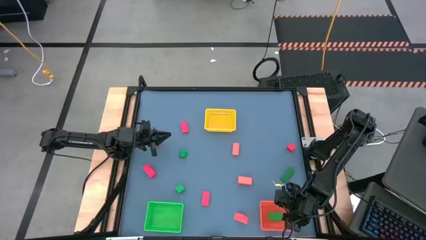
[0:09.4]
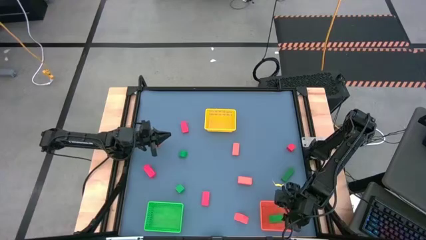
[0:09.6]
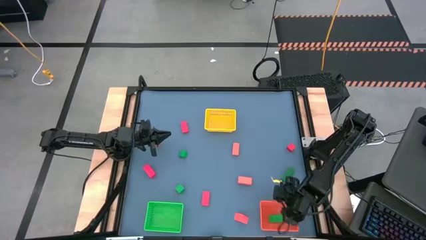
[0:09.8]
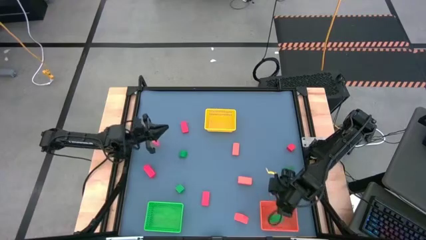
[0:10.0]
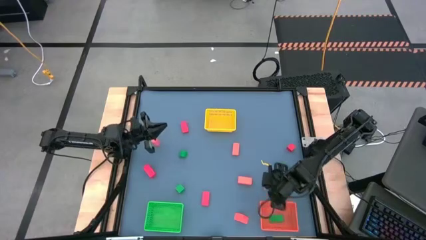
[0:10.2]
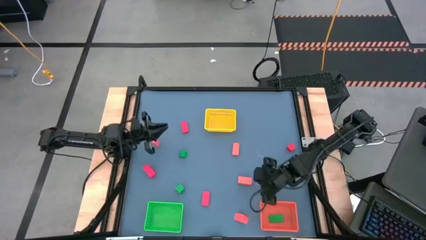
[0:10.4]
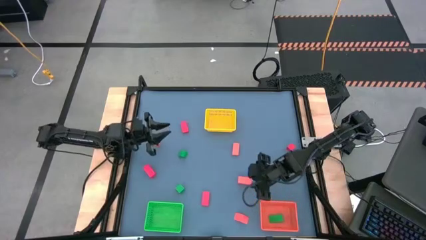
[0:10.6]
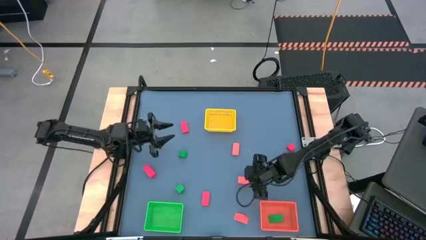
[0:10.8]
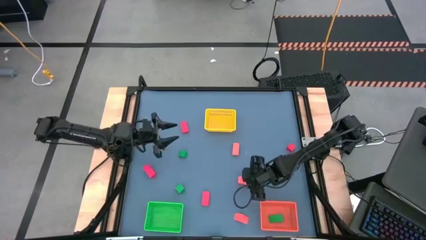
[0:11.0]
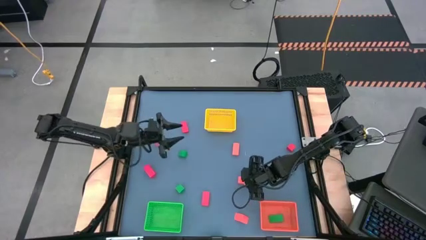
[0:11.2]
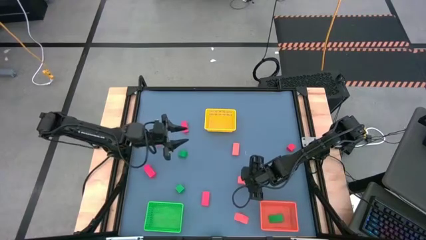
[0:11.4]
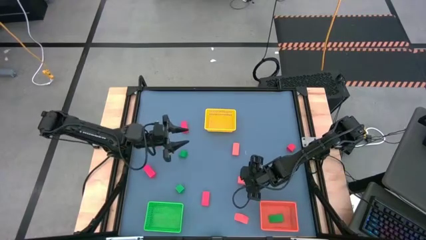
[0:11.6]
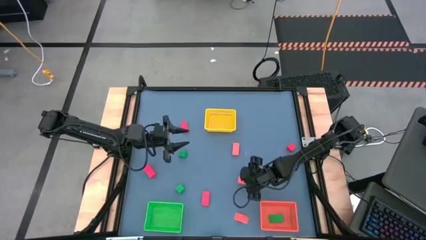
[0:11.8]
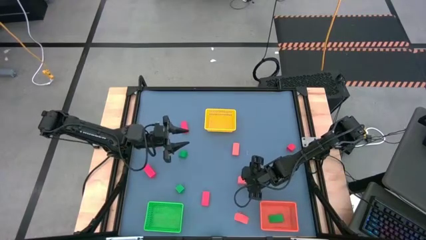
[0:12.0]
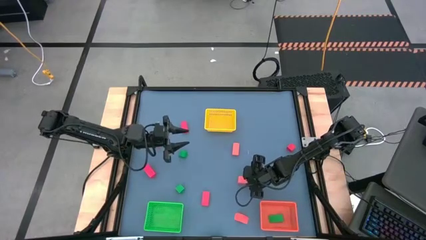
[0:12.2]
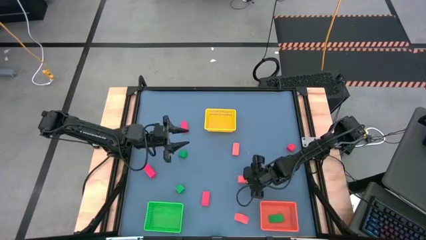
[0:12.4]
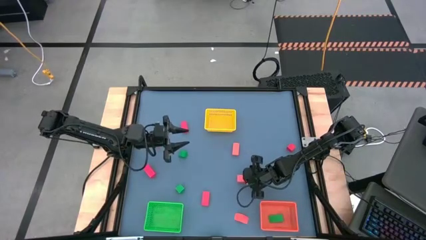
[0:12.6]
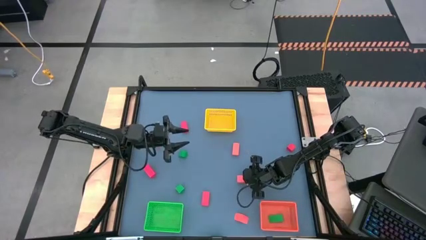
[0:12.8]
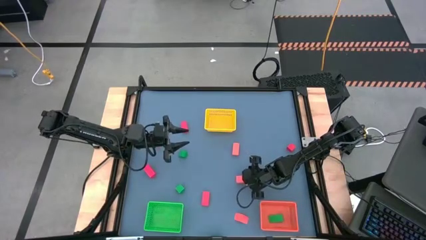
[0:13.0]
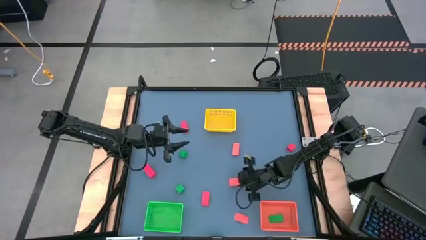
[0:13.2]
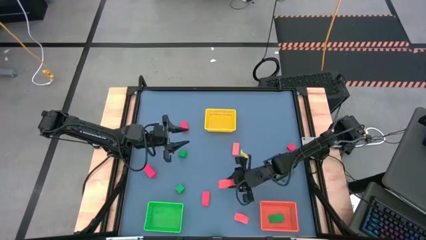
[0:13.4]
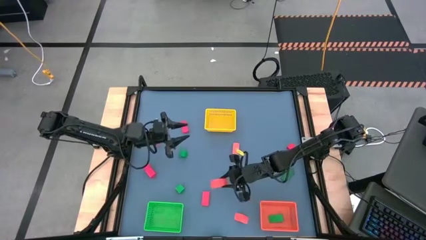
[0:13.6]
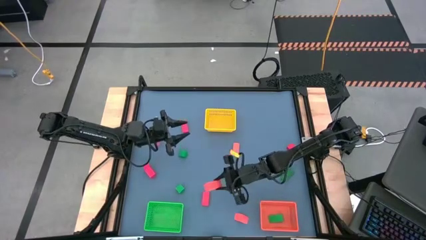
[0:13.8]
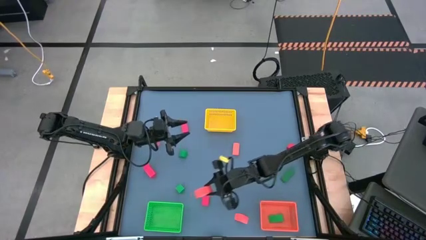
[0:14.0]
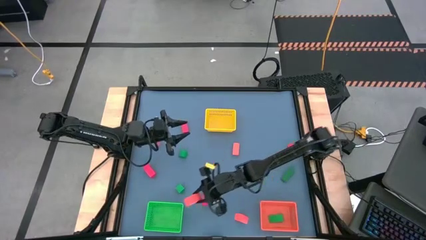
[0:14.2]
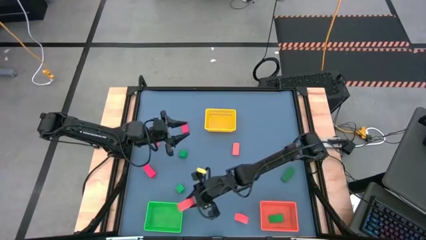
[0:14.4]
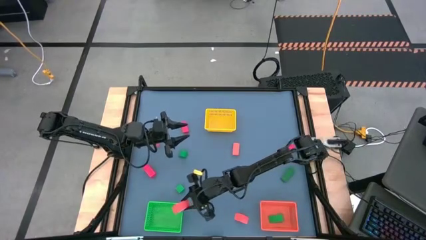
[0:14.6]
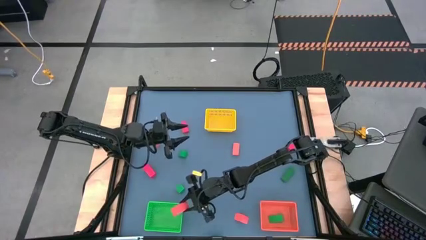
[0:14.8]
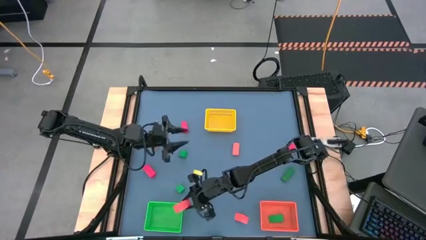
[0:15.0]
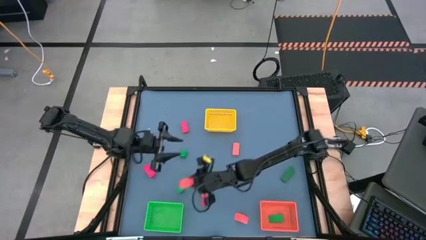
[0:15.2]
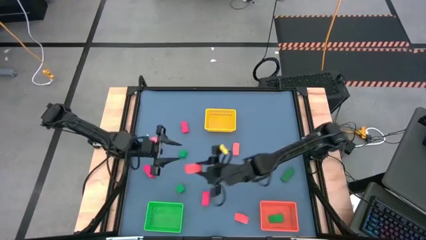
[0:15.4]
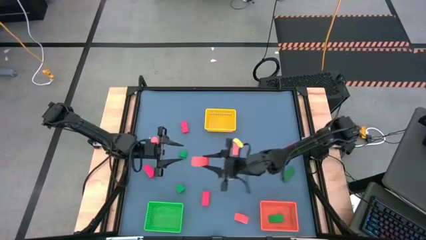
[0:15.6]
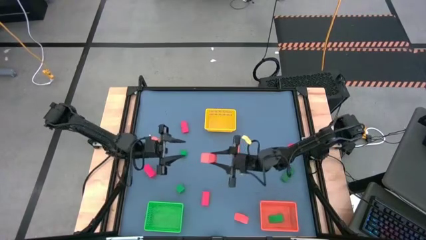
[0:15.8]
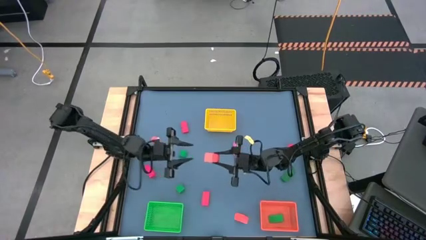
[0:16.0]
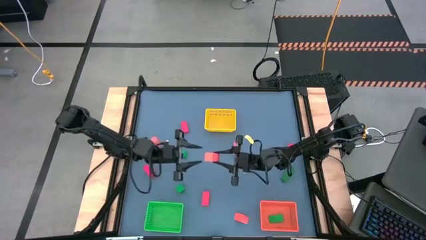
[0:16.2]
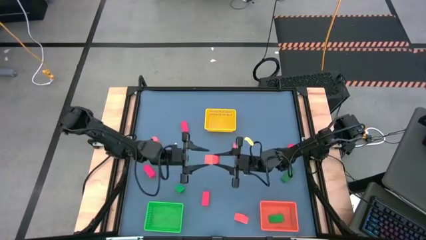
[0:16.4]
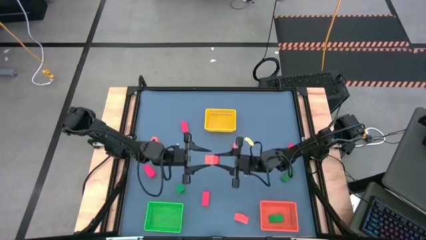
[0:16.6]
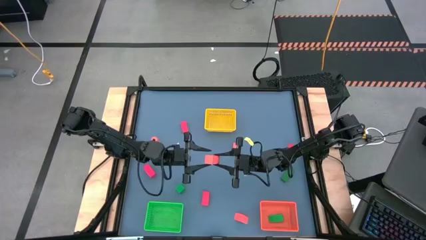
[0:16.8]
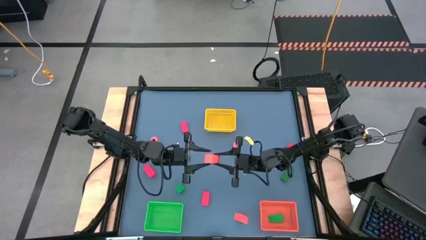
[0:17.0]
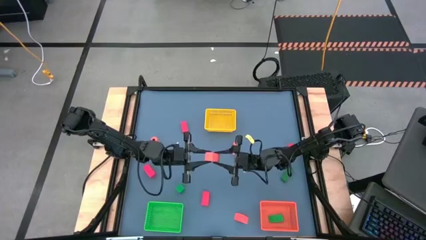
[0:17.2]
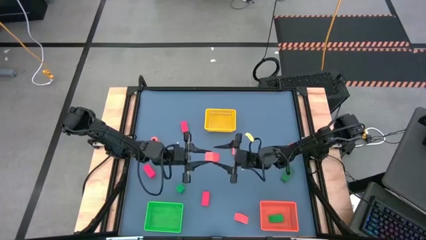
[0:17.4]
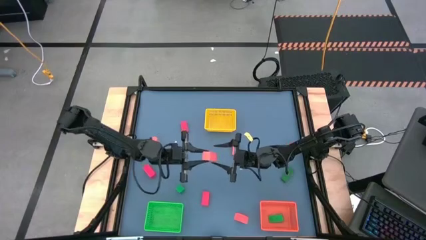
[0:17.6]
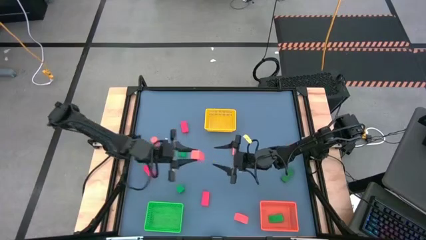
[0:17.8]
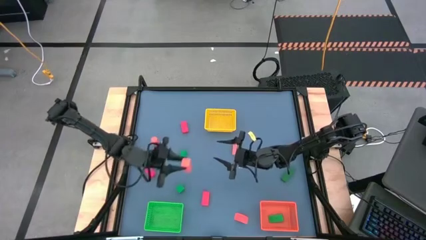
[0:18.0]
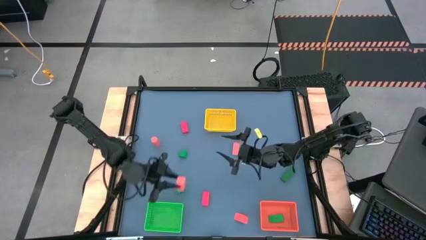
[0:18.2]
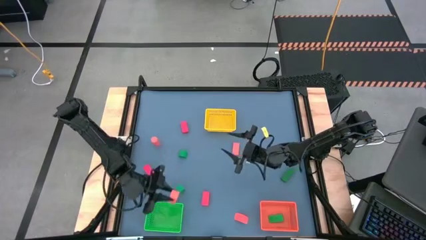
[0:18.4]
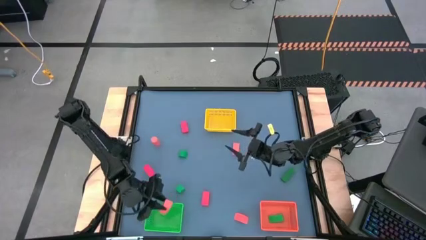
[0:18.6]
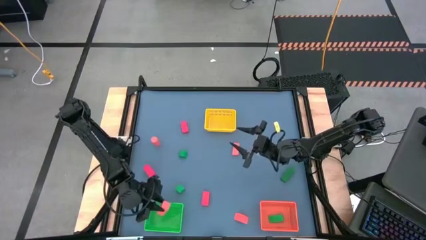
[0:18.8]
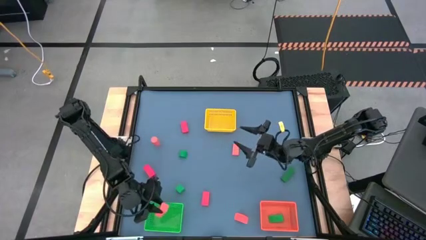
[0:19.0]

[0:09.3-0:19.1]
Task: Sort & place blocks by color
Put the orange block into the green bin

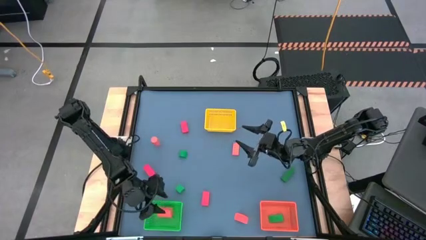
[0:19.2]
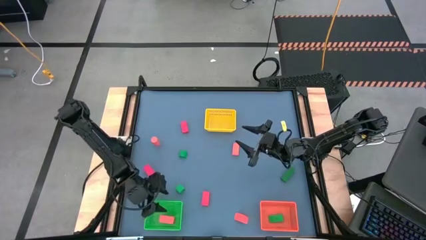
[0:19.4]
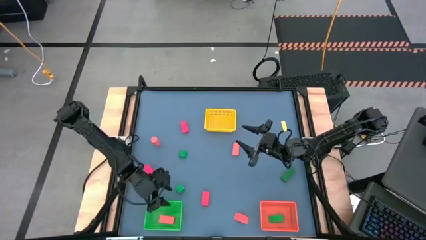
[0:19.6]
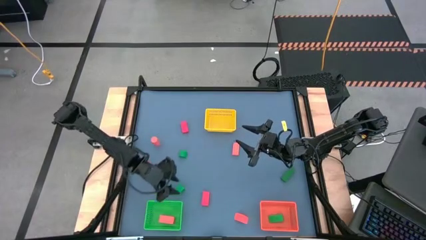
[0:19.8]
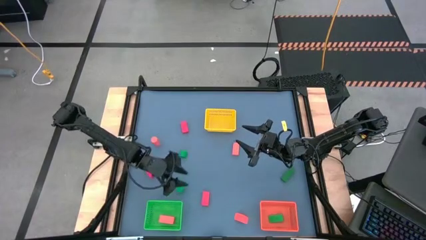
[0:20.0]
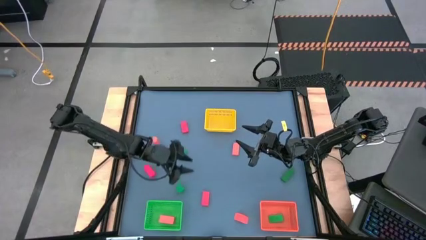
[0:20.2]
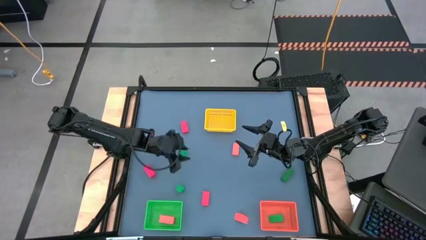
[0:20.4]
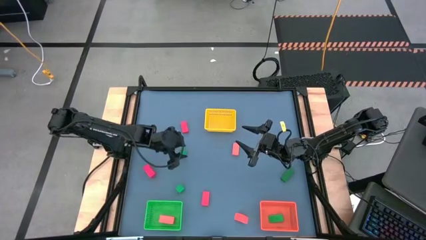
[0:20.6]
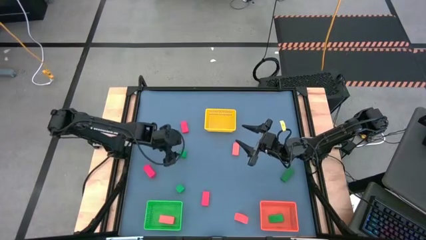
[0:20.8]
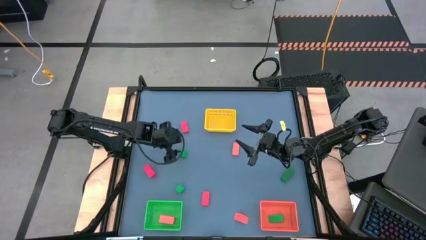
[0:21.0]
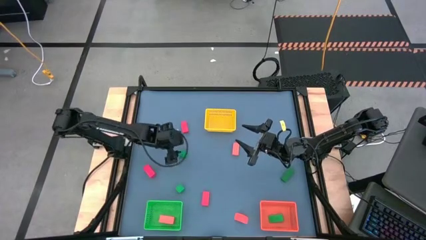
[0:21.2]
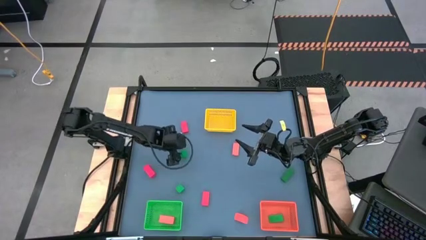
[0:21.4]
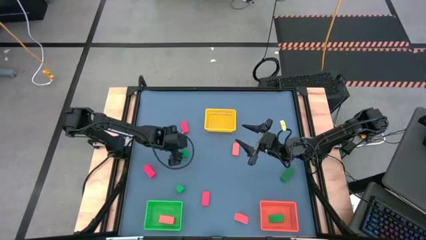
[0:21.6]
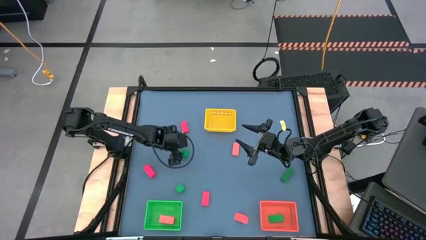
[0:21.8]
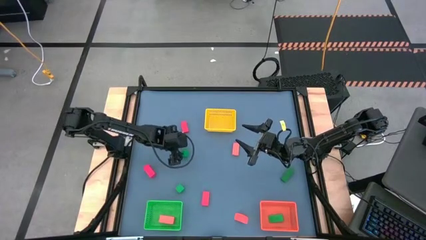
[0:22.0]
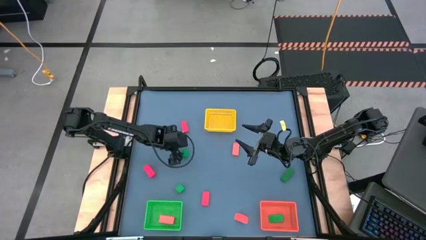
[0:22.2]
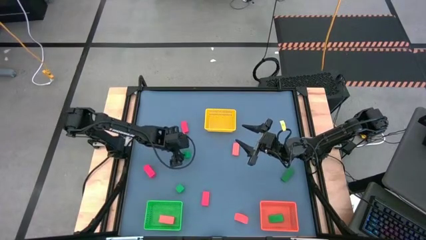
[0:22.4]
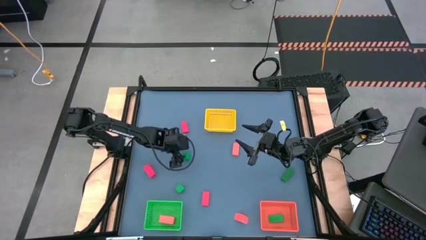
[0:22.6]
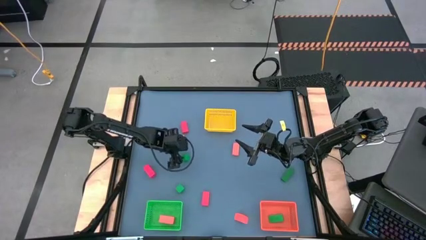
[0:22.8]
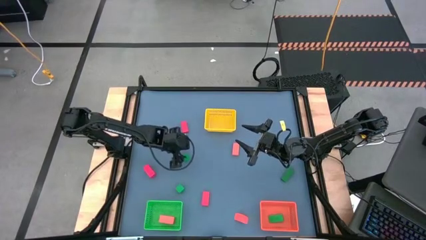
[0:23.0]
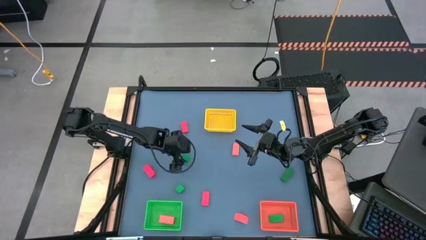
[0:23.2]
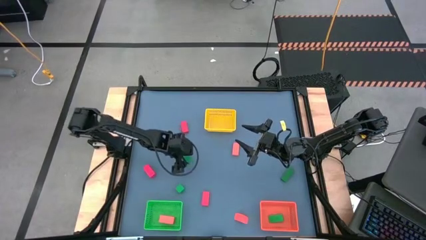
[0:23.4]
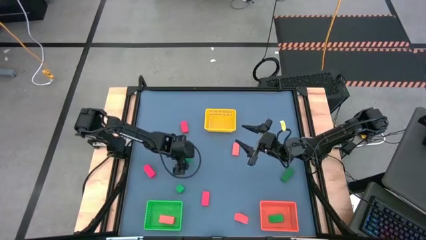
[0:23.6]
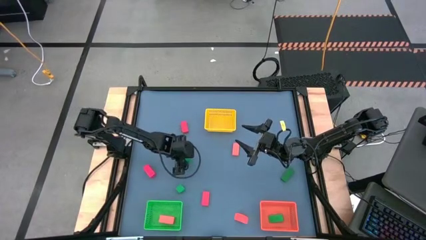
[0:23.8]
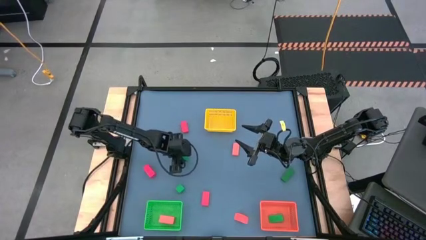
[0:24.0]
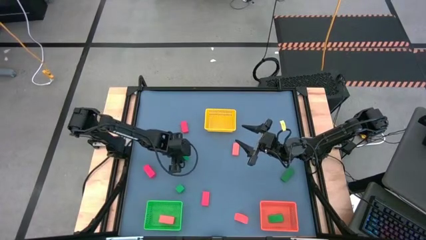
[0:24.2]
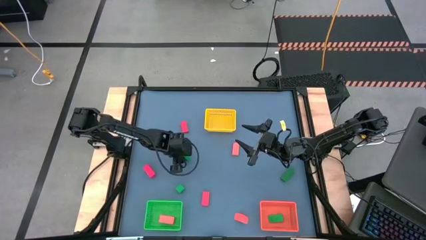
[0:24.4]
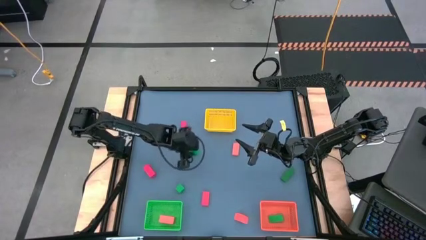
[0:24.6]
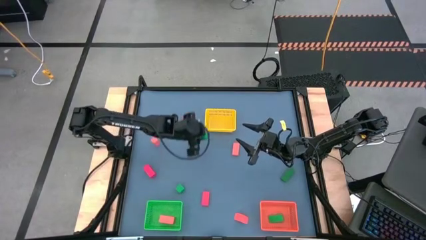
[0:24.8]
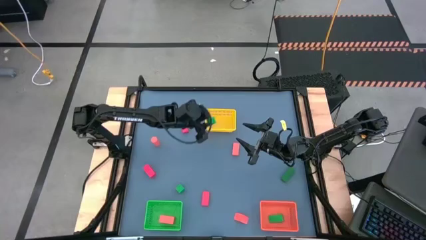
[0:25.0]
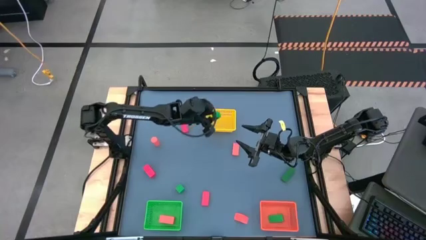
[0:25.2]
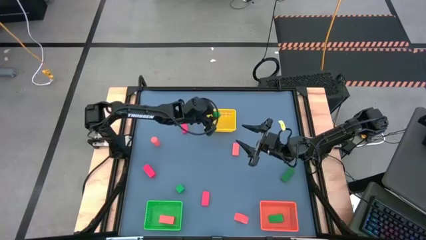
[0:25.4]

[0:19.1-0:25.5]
Put the green block into the orange bin
